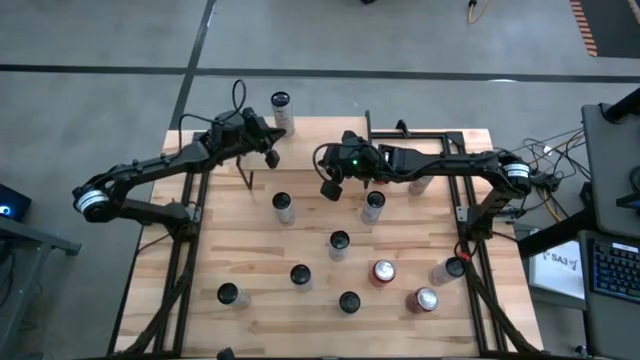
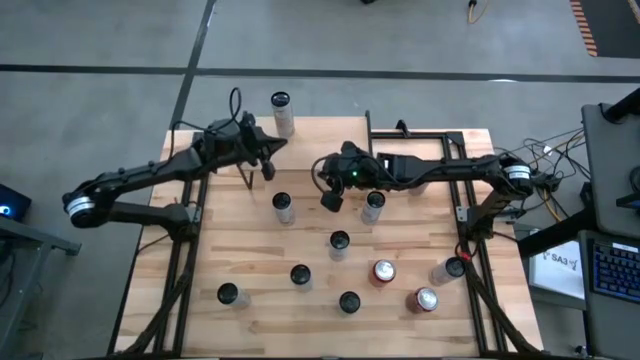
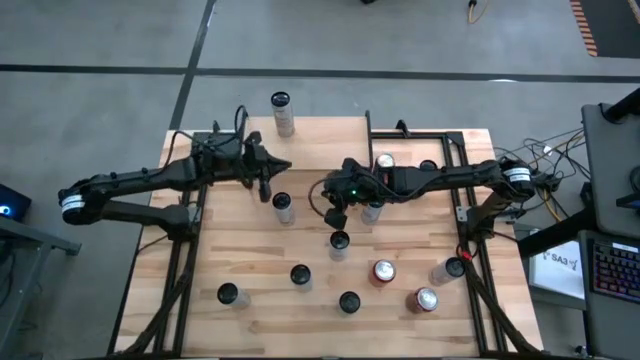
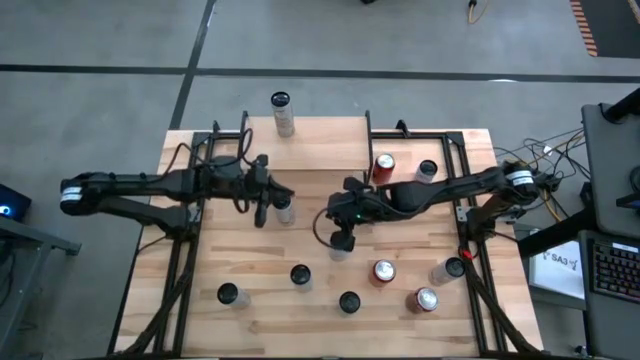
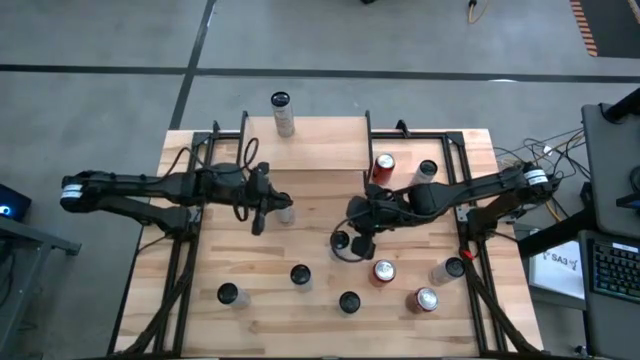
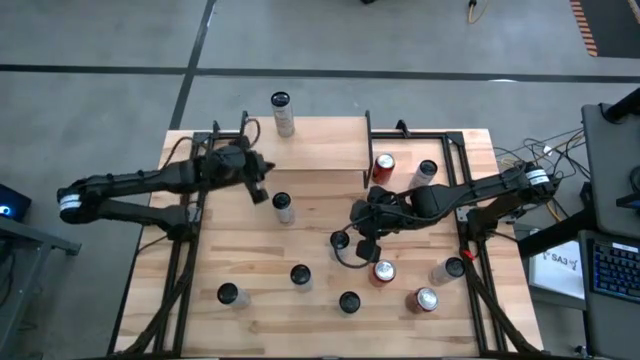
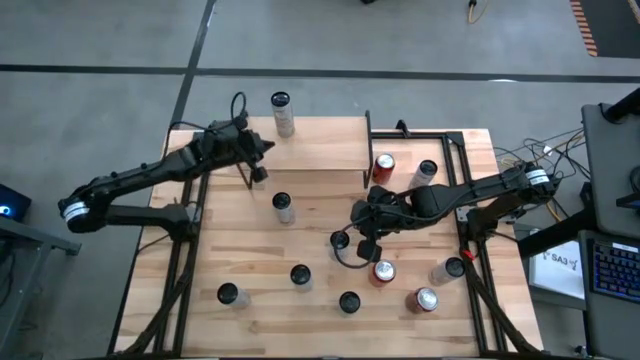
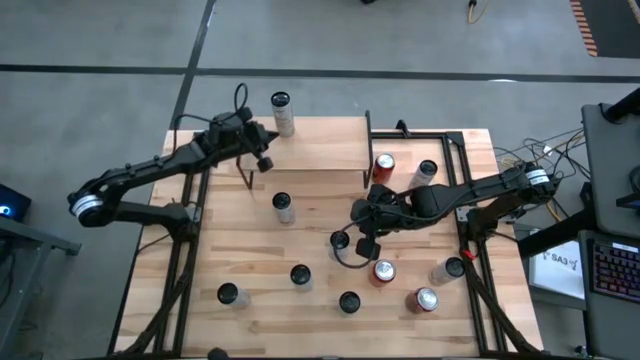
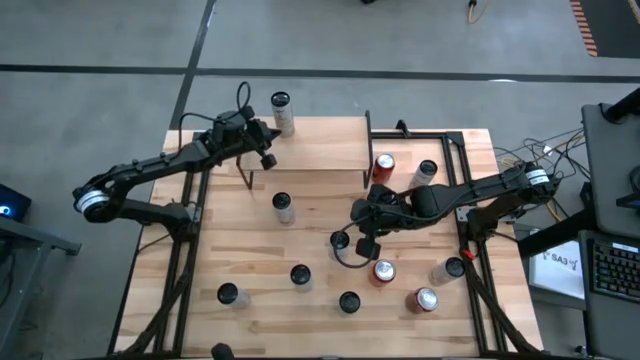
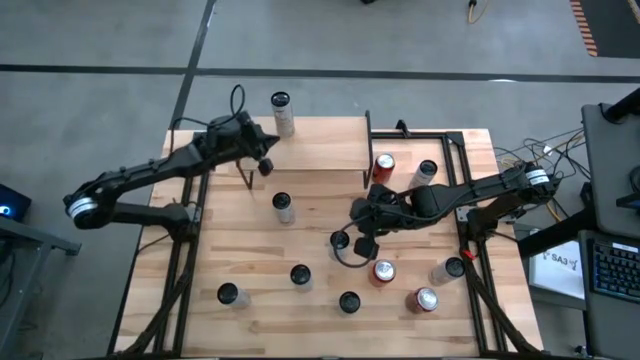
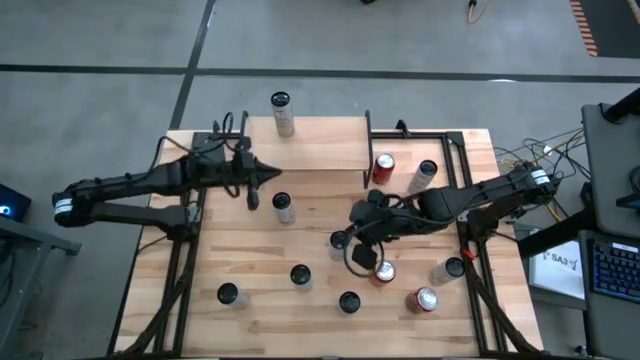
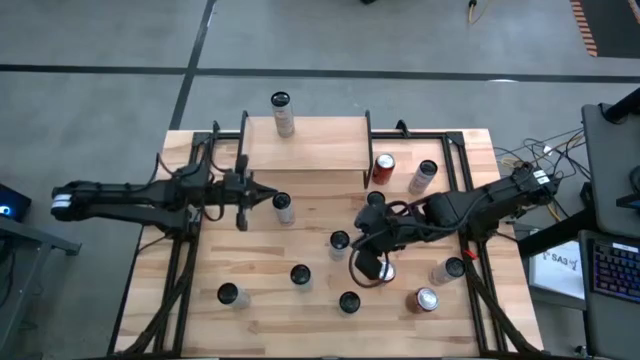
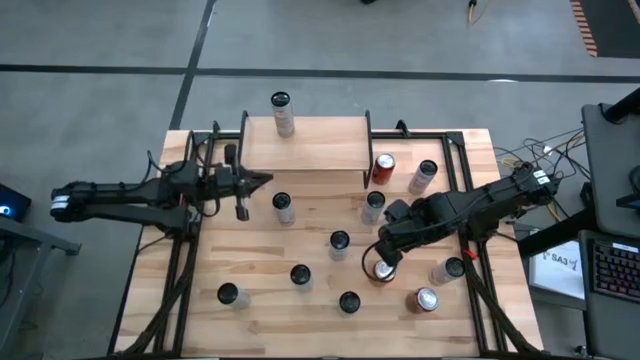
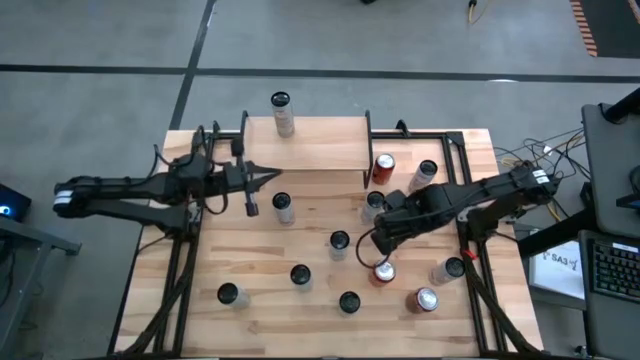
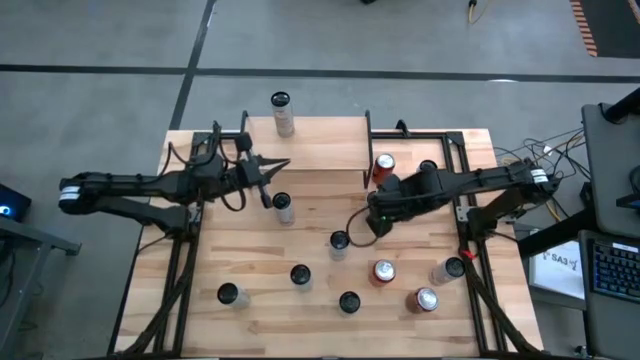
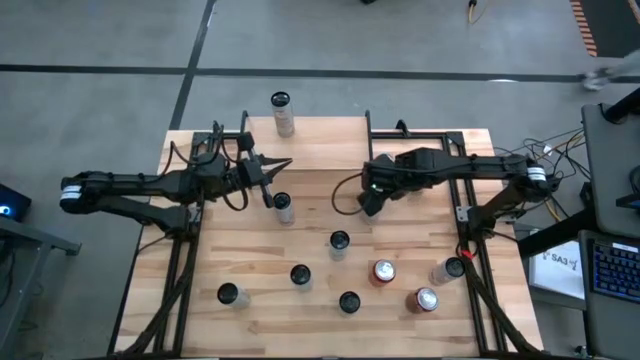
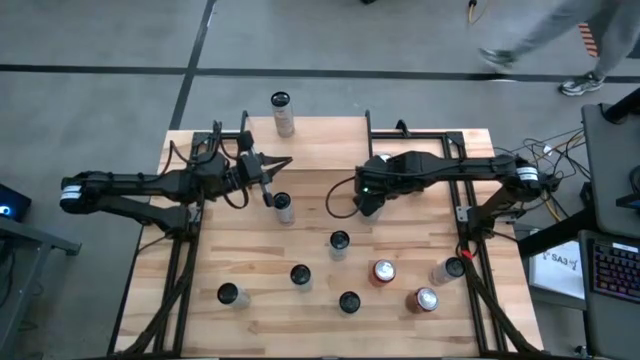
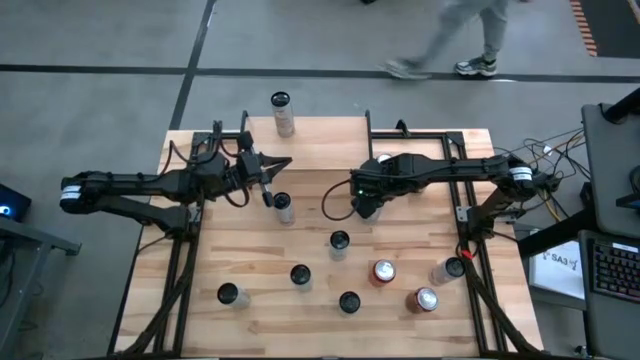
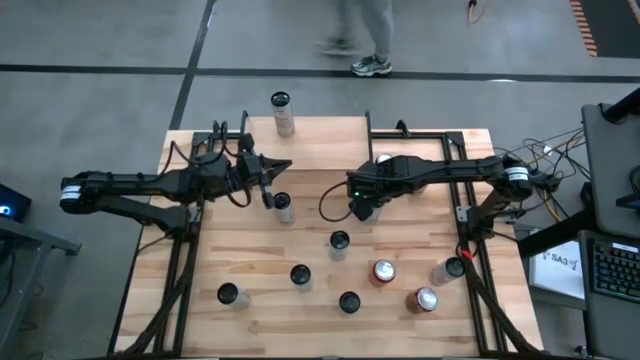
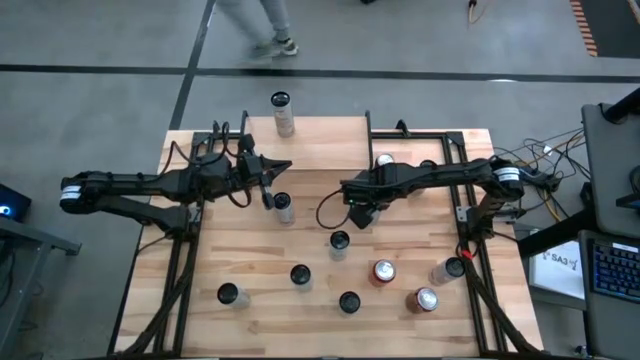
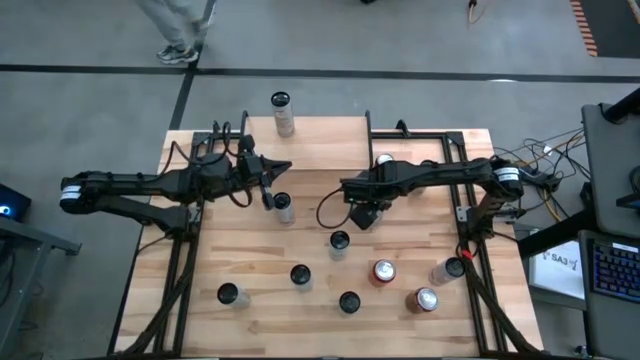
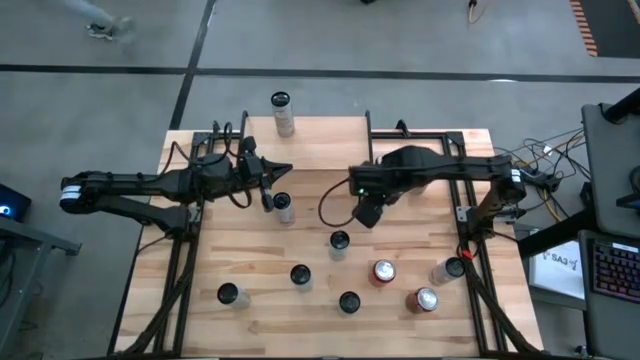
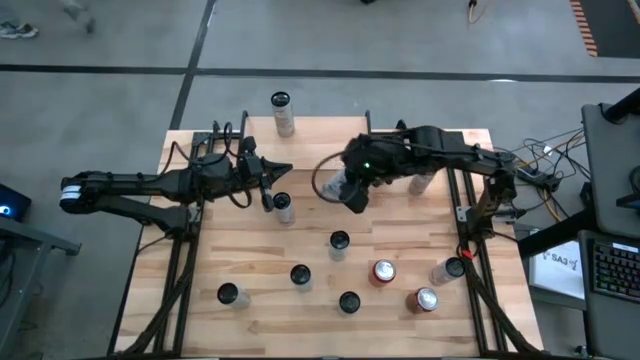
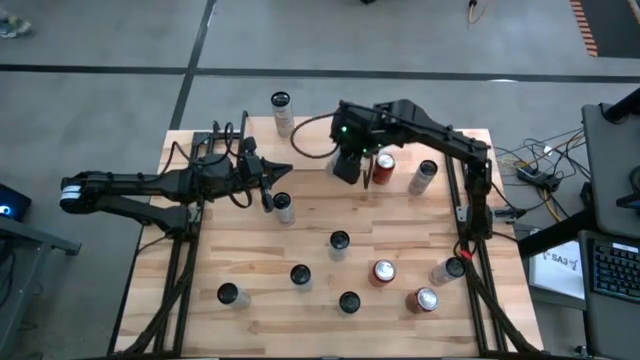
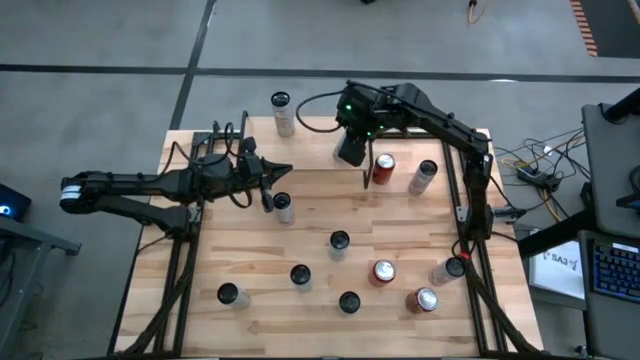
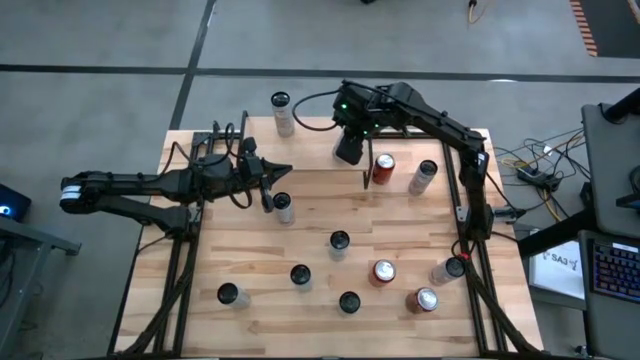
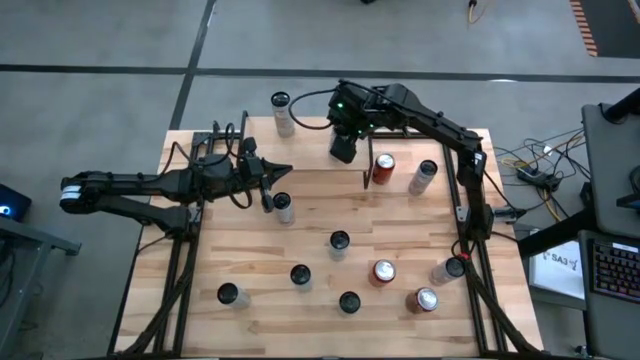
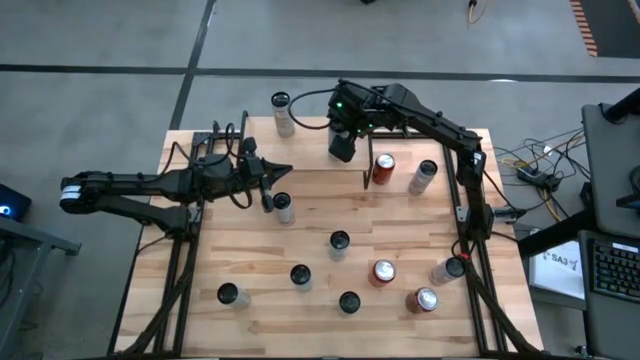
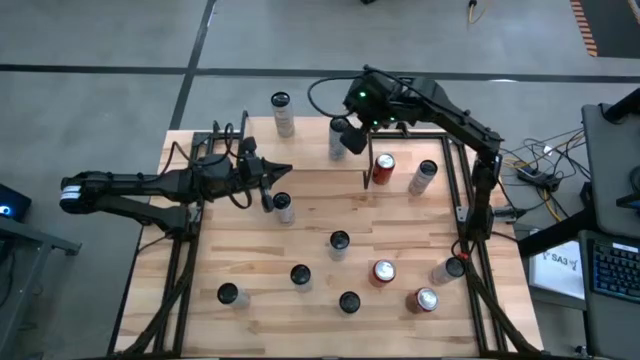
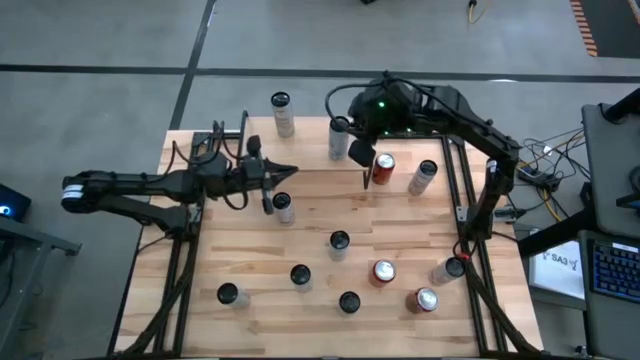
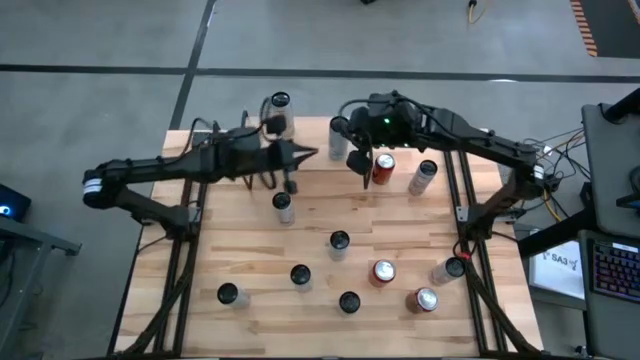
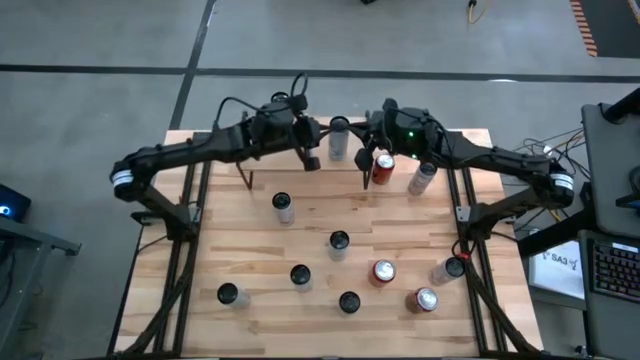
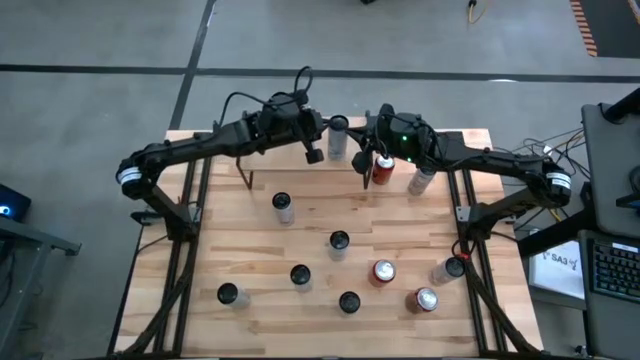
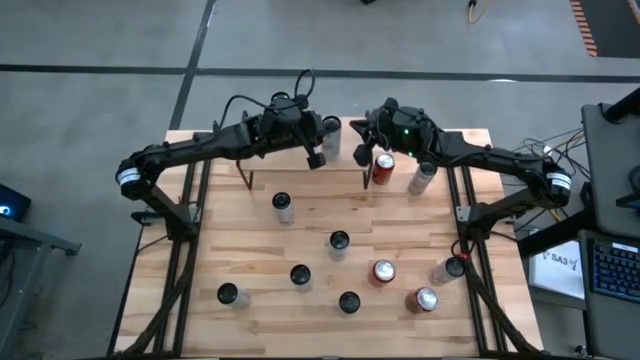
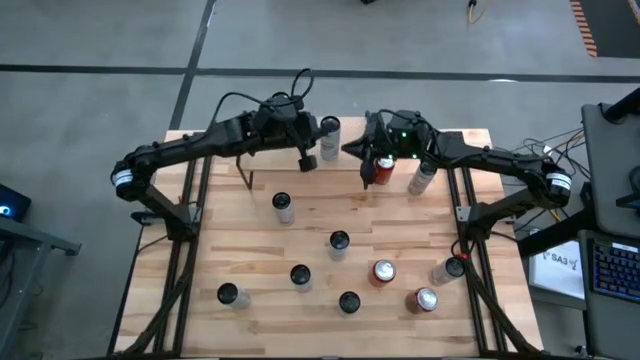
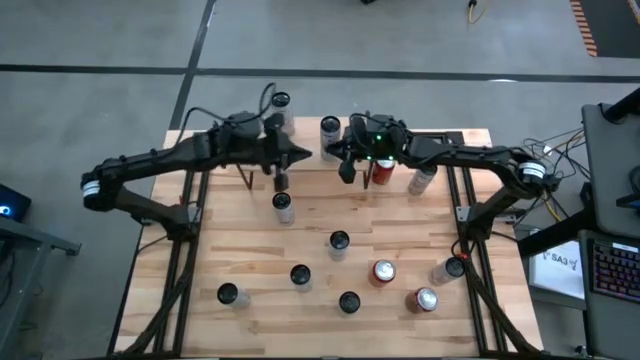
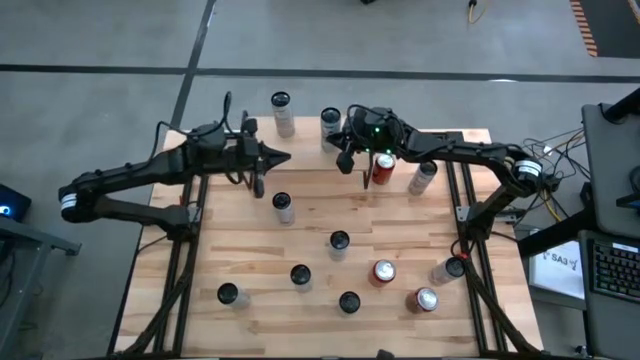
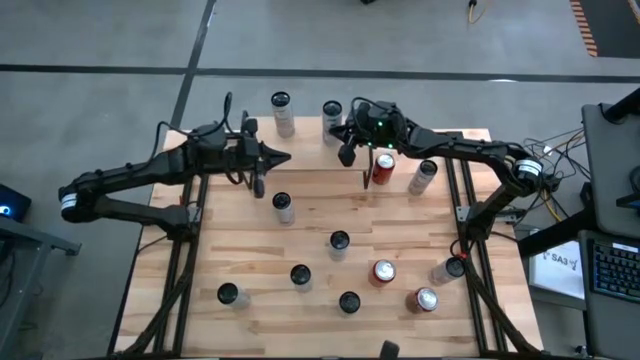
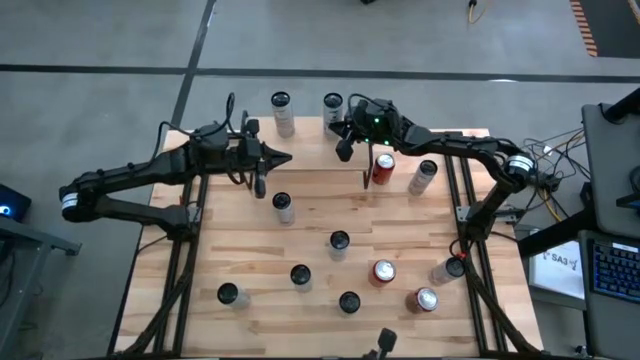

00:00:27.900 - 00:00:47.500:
Task: Place canned beverage on shelf
Put the white soda can on the shelf

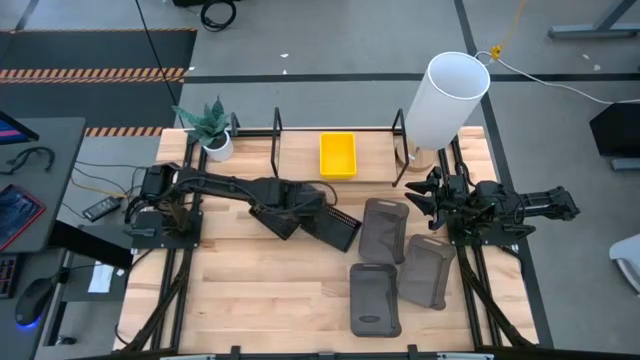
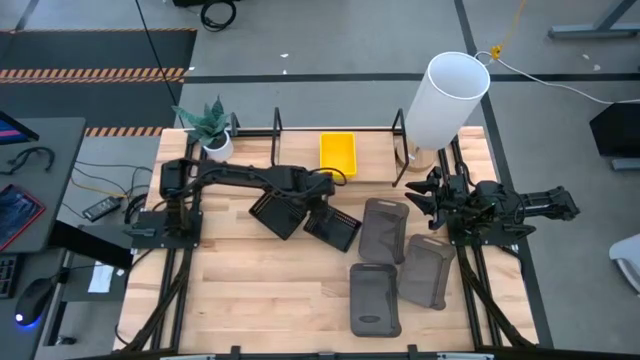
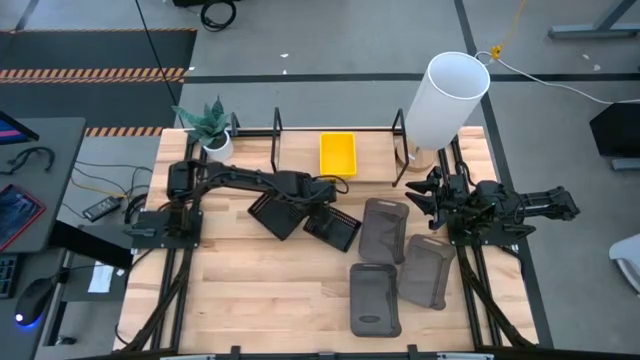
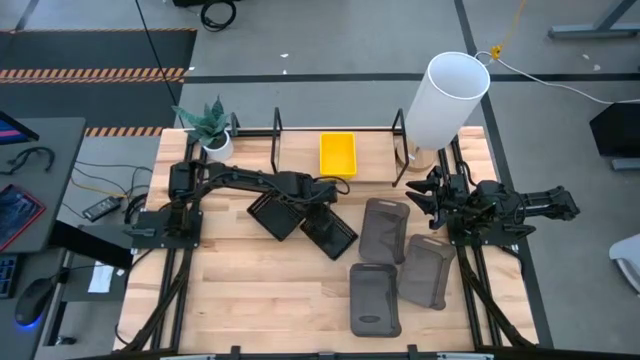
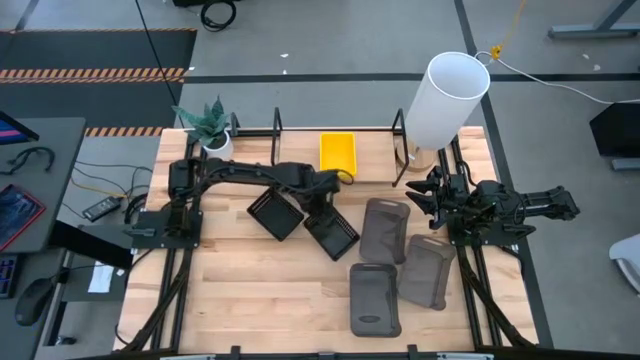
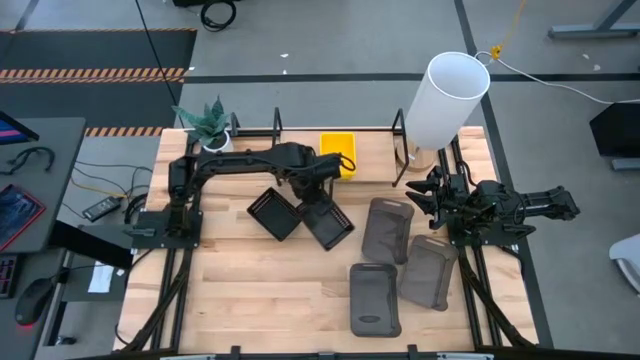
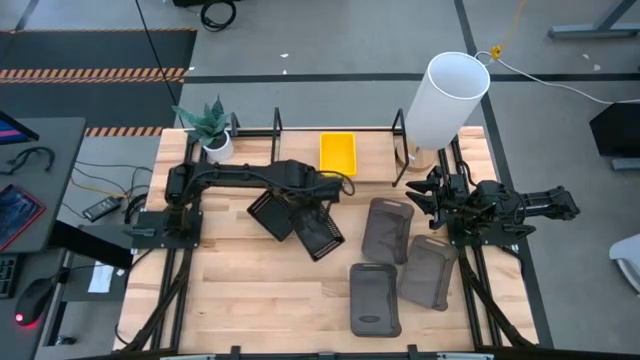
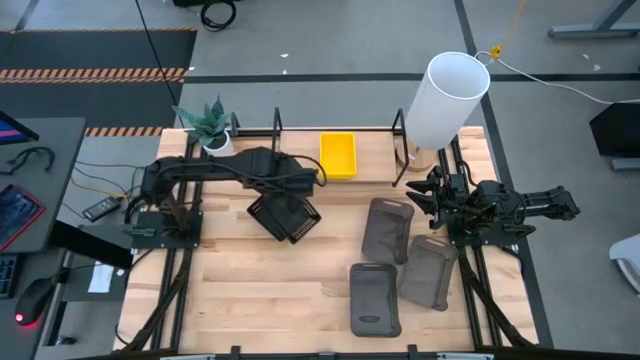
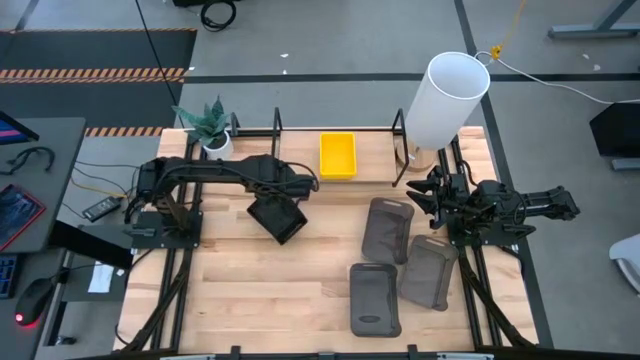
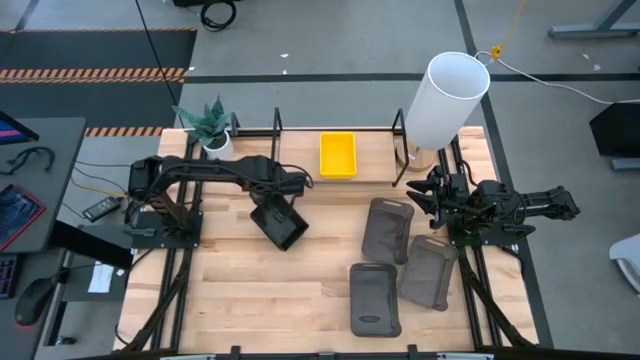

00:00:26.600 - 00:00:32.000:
Task: Stack baskets on shelf by color
Stack the right black bin on top of the black bin
